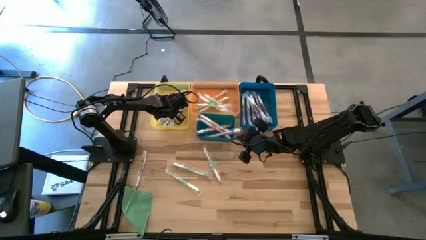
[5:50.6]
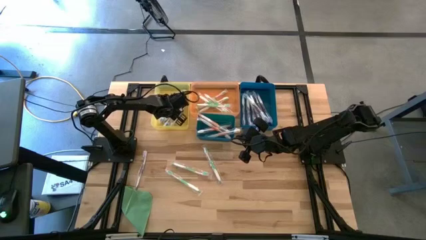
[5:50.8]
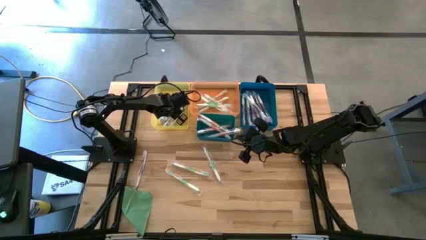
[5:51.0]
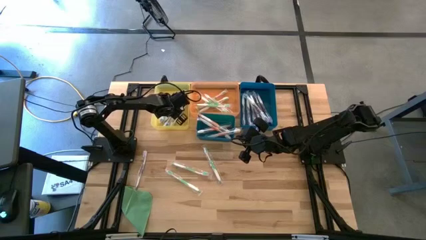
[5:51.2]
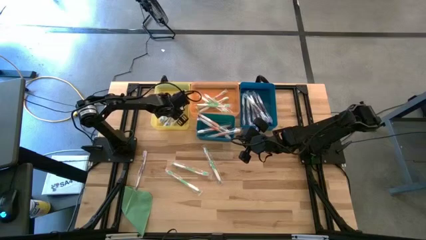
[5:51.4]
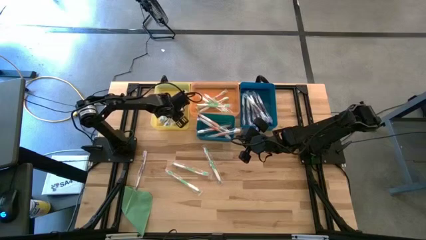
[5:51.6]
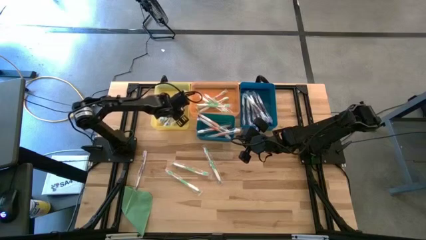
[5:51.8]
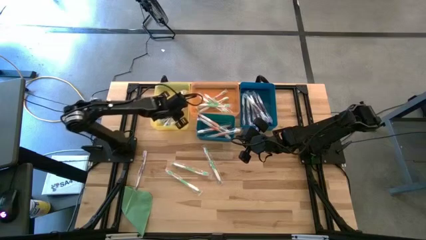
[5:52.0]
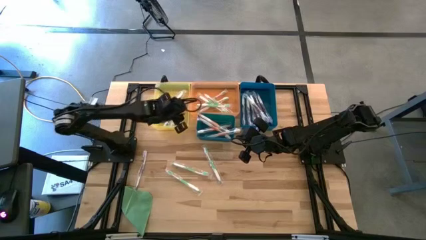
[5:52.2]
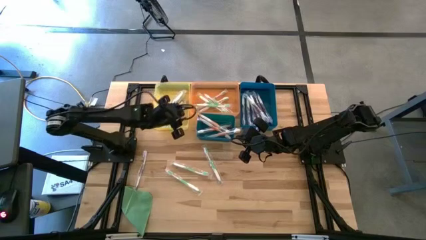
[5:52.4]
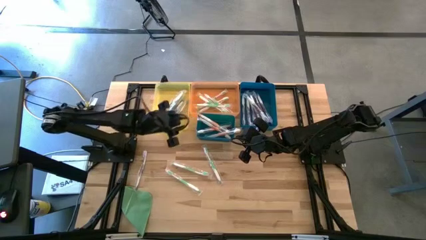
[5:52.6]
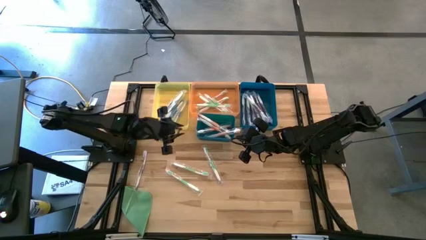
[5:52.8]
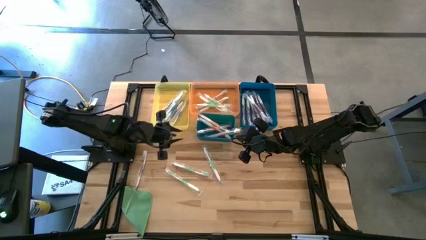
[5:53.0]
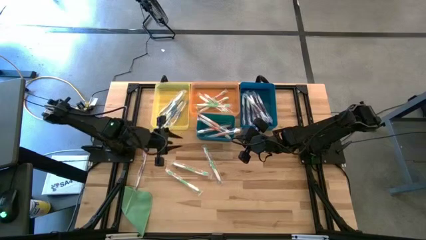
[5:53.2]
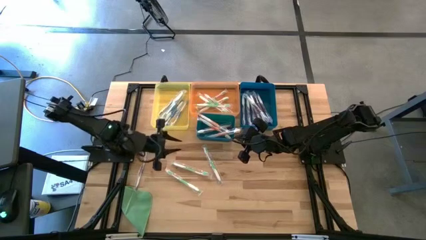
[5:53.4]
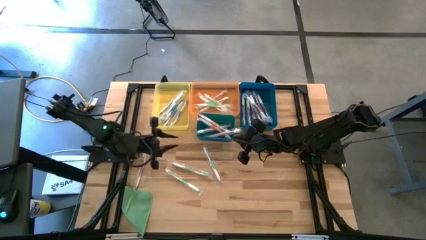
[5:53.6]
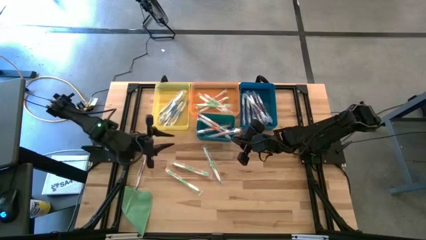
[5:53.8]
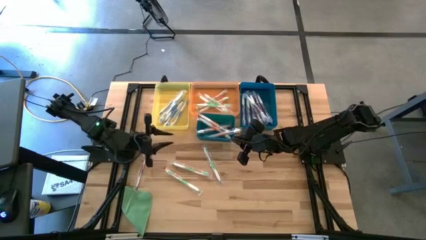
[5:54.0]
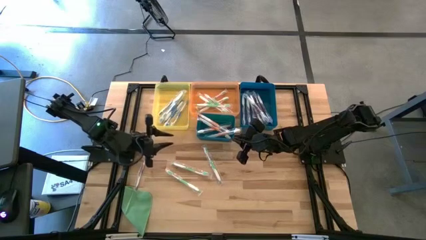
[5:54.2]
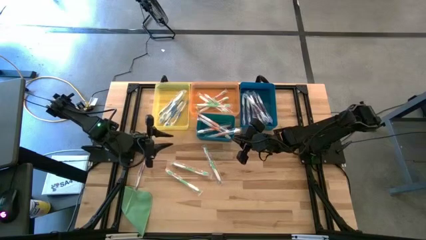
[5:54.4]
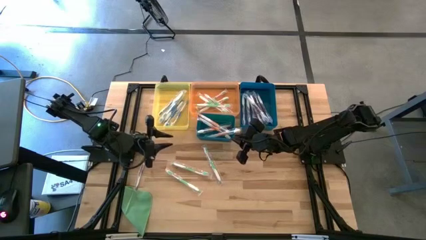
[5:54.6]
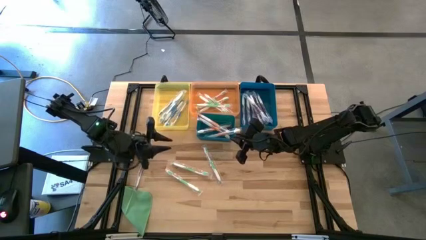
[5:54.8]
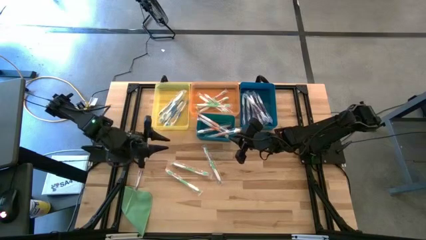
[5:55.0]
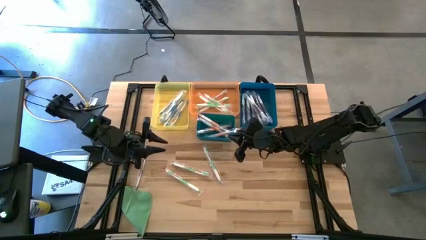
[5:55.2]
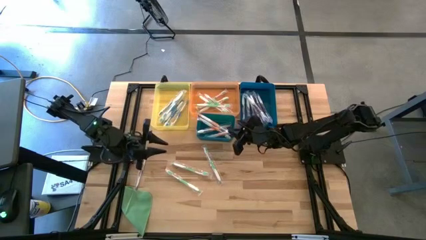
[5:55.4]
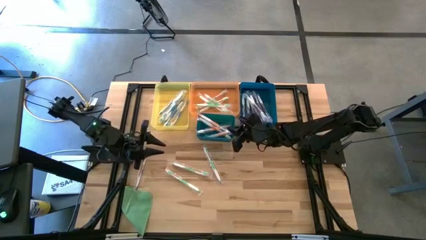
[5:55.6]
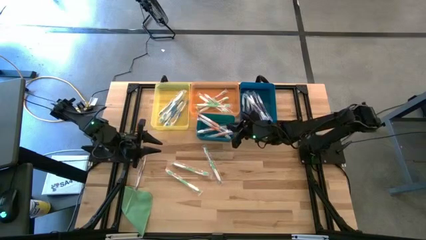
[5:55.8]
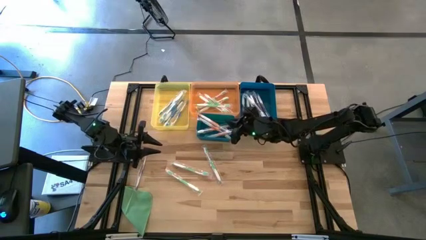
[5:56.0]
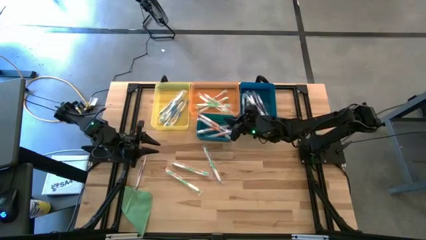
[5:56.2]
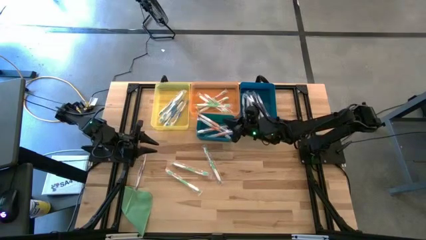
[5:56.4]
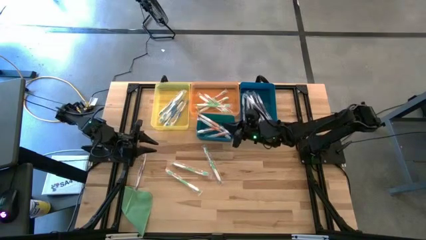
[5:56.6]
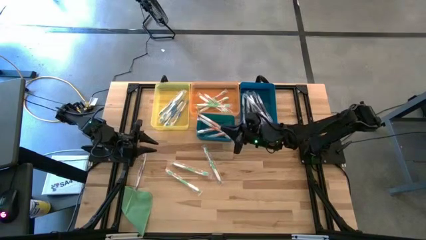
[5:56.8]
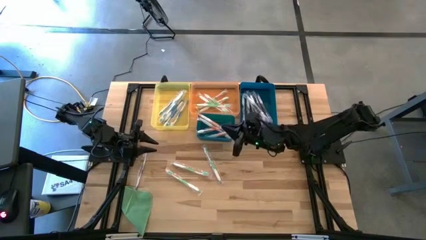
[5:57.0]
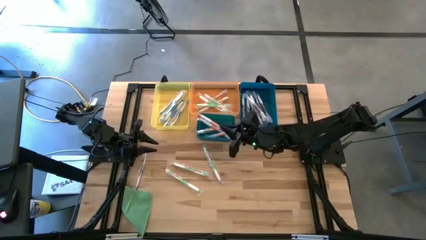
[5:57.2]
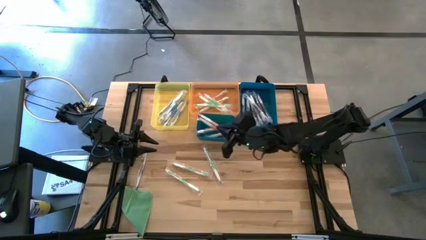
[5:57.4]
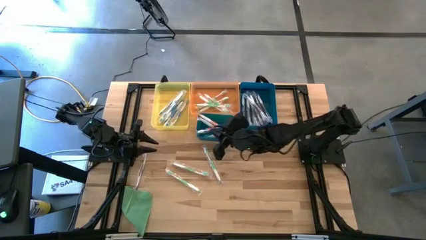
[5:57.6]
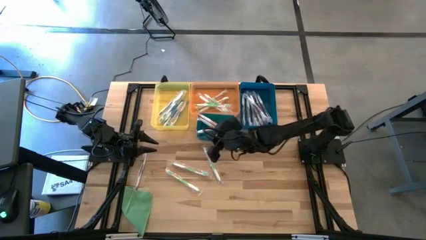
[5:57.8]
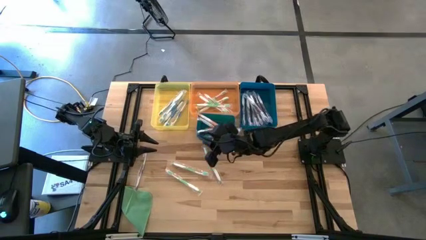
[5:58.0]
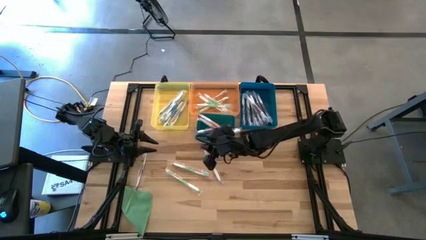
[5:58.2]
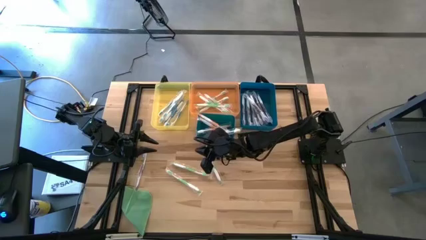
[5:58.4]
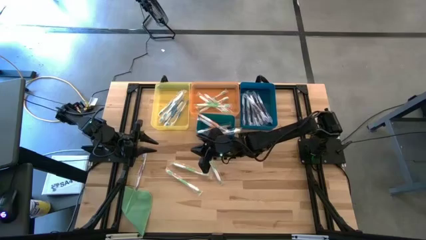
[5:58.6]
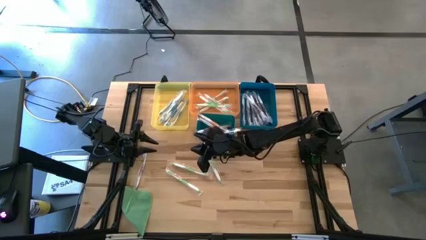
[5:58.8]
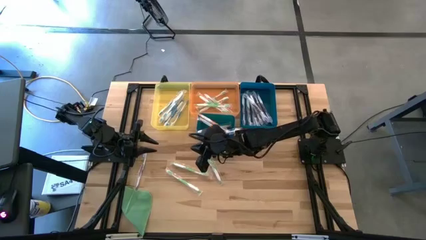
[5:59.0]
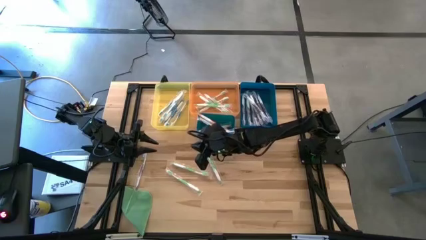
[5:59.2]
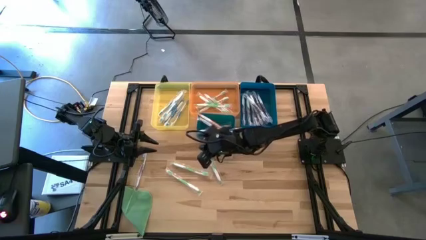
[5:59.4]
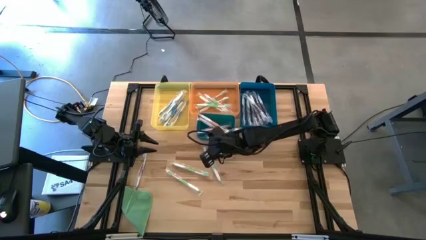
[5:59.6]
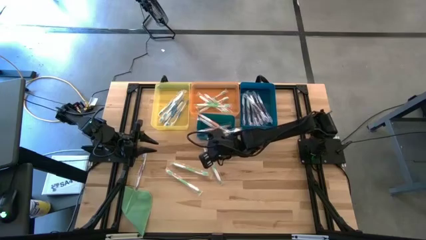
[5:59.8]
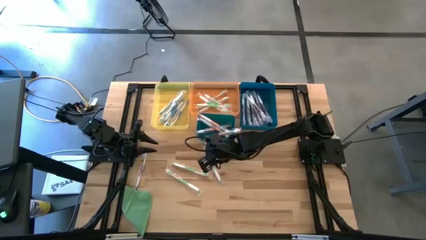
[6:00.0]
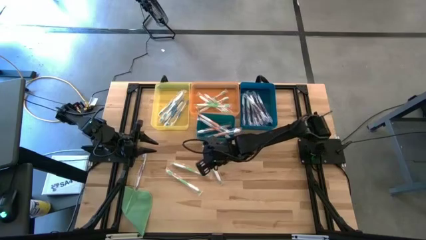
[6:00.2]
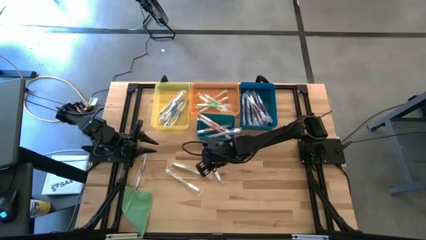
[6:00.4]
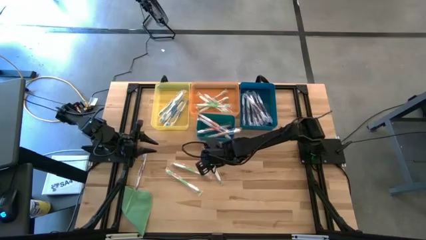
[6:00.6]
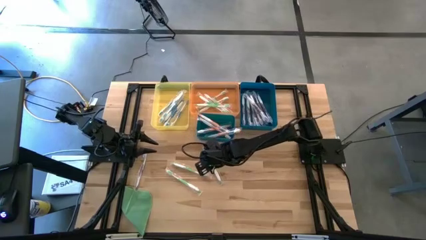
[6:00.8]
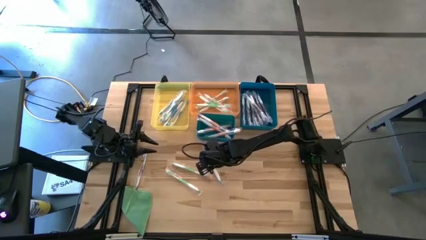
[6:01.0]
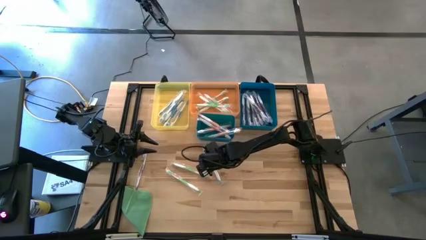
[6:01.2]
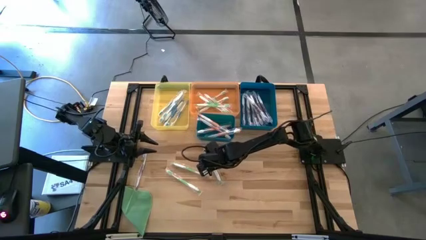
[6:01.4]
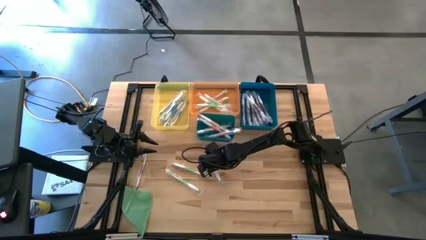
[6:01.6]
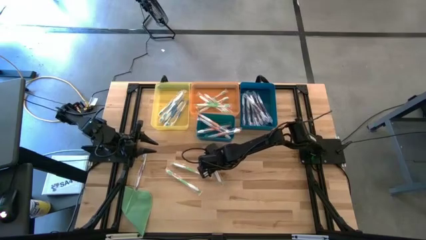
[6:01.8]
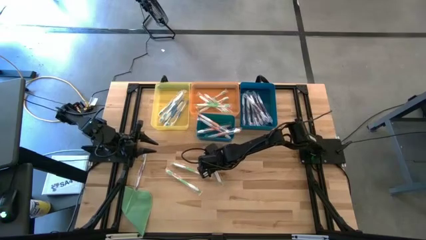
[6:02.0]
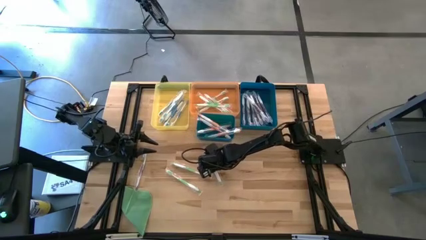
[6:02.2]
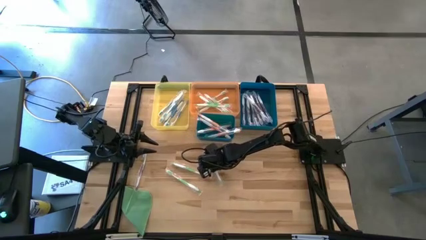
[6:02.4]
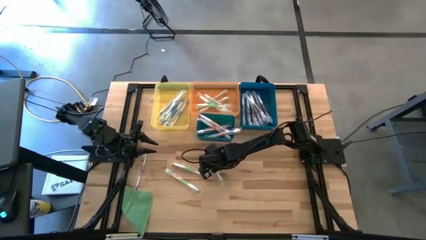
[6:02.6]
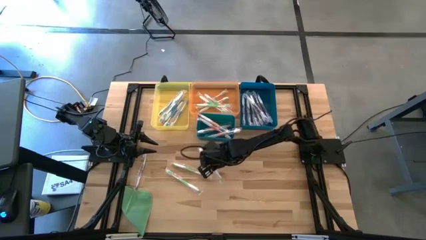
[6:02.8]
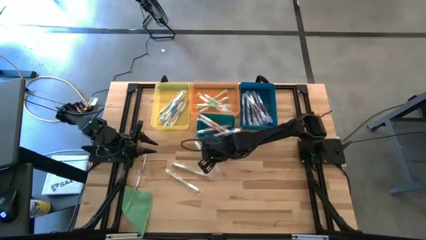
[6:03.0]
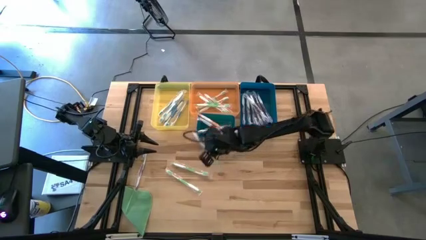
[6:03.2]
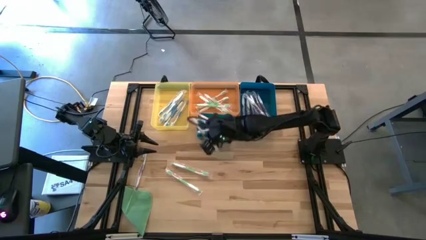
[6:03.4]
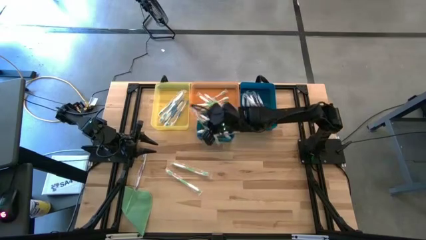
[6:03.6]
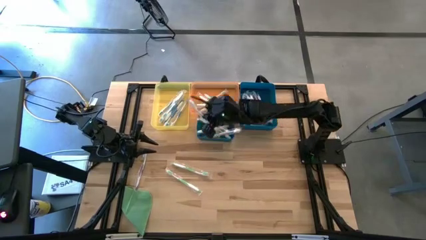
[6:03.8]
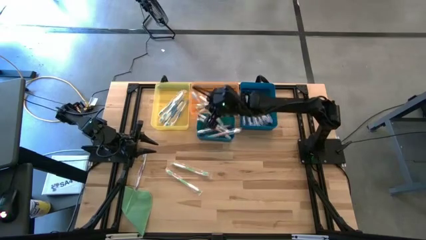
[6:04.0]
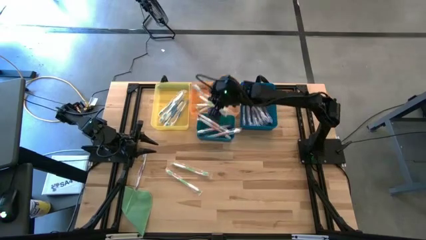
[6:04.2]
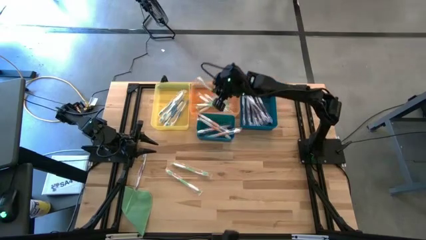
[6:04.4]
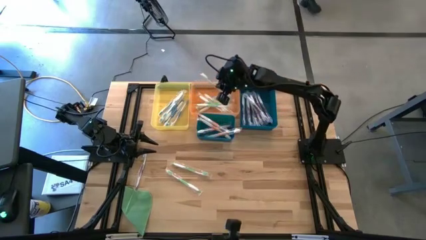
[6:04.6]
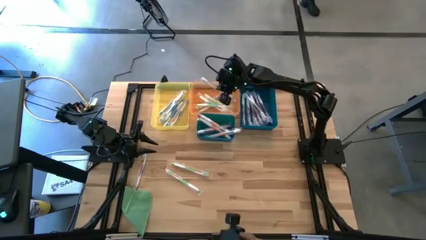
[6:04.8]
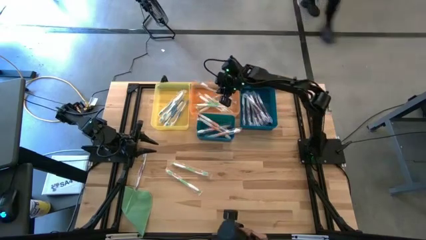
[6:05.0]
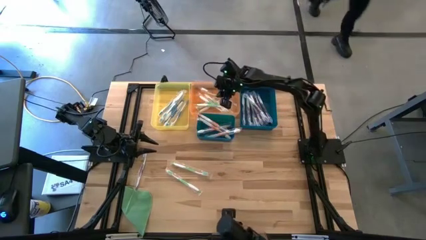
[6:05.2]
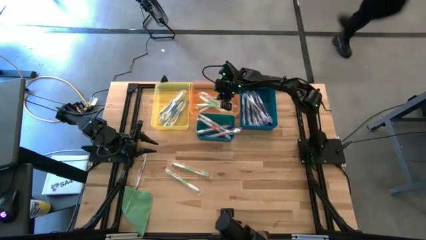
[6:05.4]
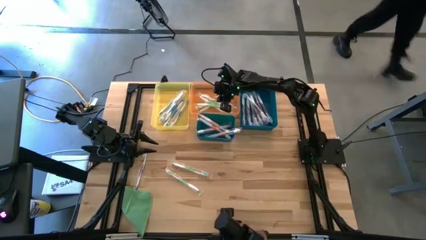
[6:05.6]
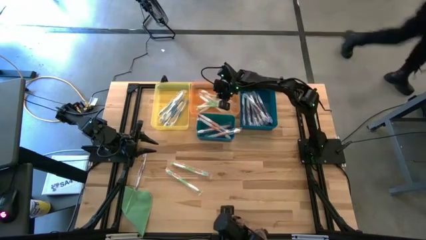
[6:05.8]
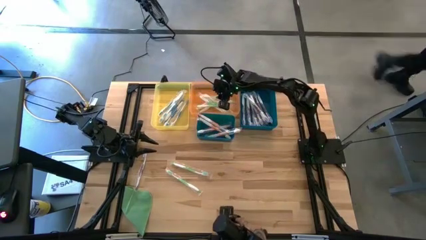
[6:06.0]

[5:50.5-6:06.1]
Task: Pick & Place Toothbrushes
Put the green toothbrush into the orange bin
